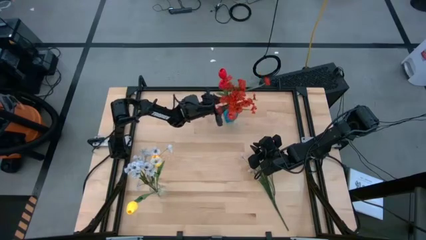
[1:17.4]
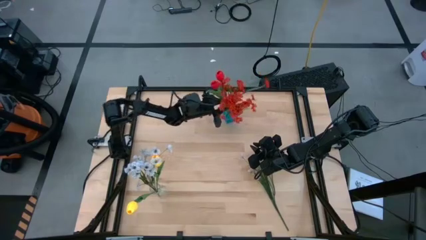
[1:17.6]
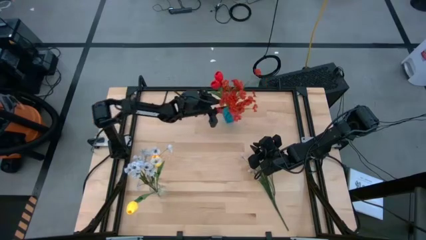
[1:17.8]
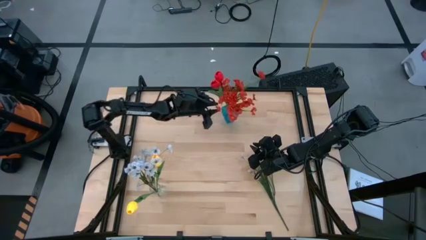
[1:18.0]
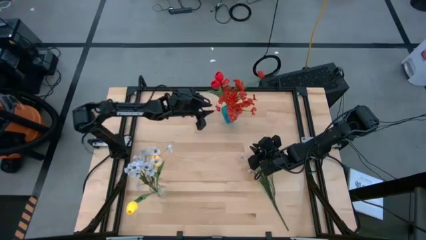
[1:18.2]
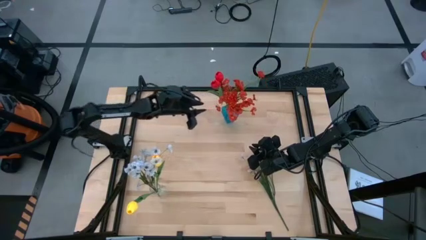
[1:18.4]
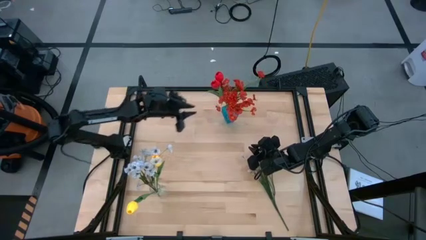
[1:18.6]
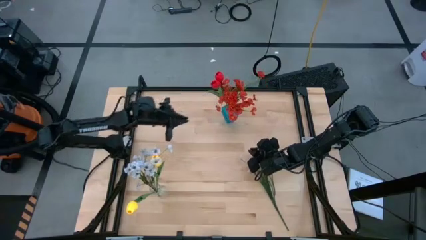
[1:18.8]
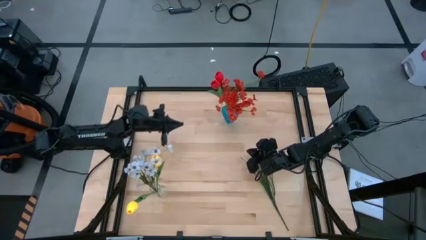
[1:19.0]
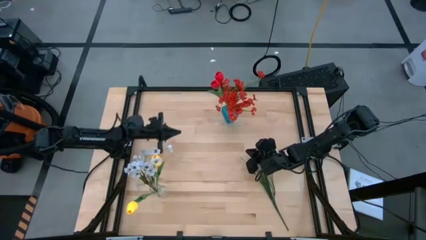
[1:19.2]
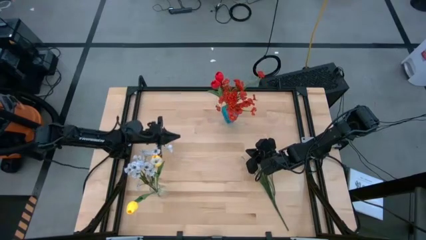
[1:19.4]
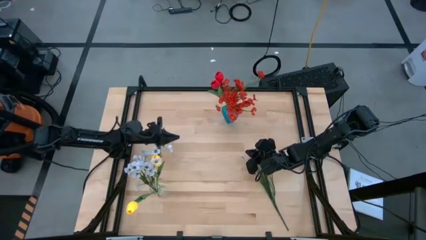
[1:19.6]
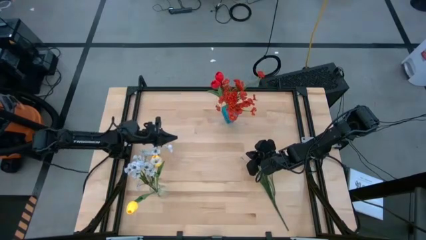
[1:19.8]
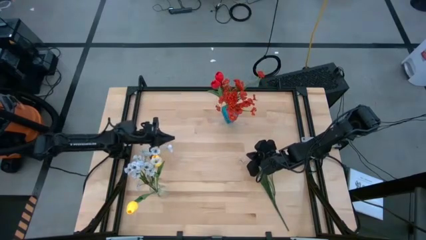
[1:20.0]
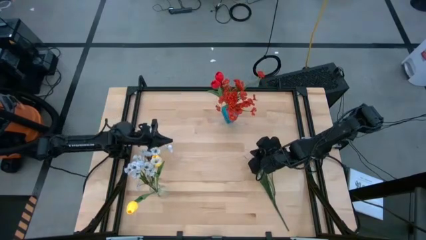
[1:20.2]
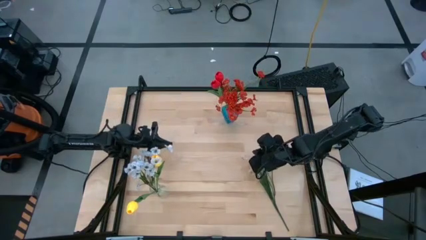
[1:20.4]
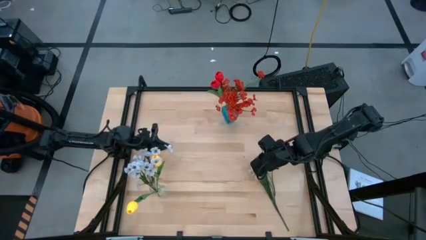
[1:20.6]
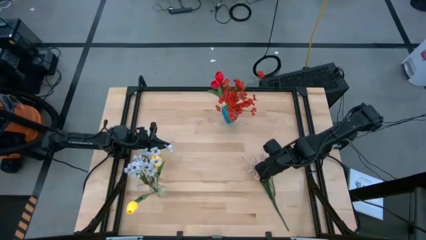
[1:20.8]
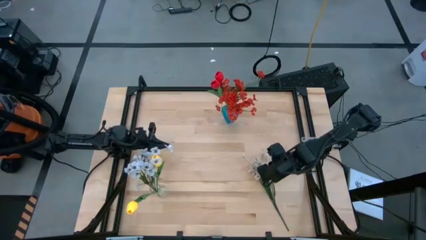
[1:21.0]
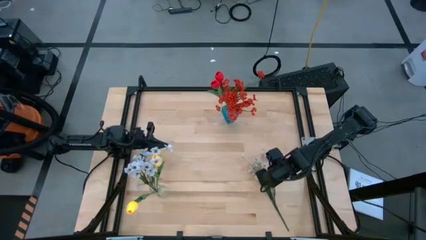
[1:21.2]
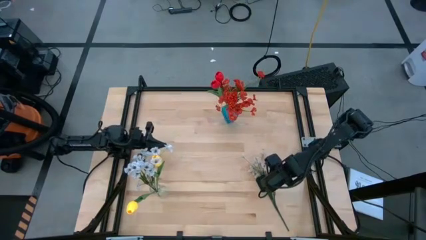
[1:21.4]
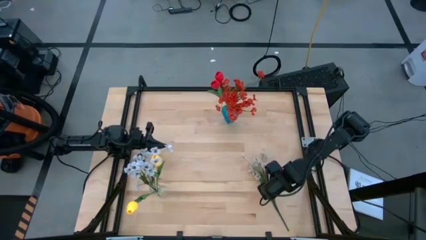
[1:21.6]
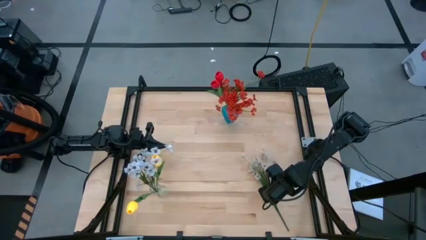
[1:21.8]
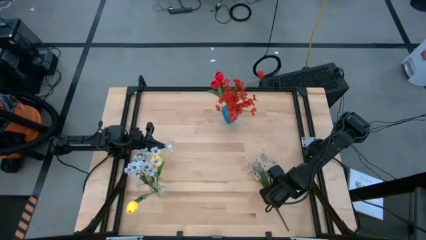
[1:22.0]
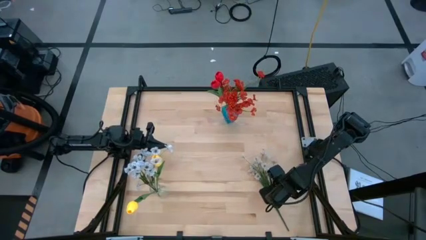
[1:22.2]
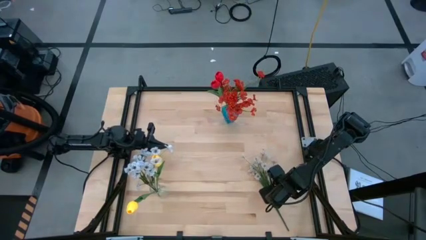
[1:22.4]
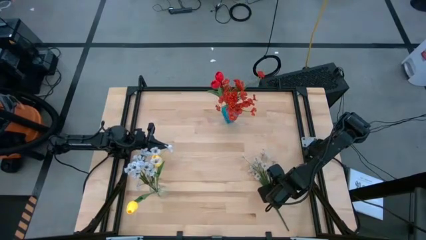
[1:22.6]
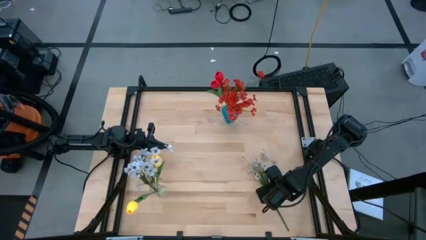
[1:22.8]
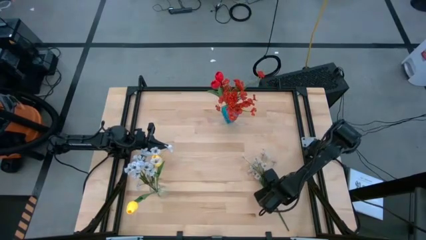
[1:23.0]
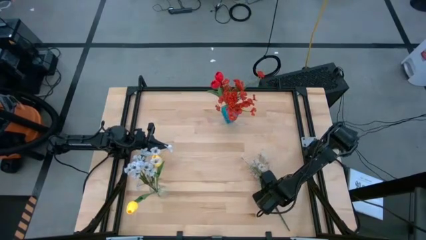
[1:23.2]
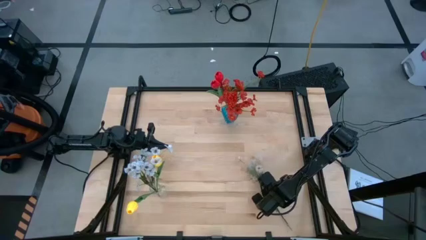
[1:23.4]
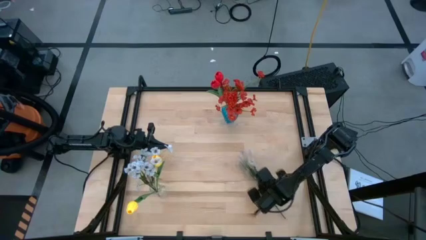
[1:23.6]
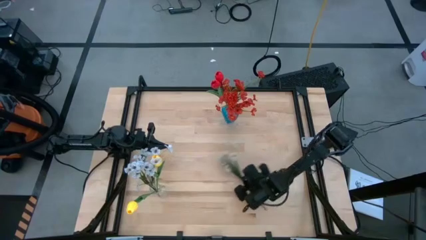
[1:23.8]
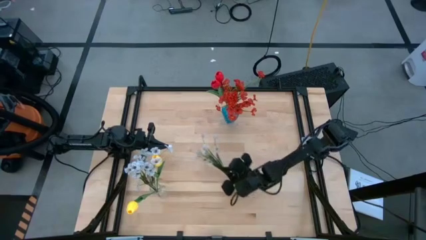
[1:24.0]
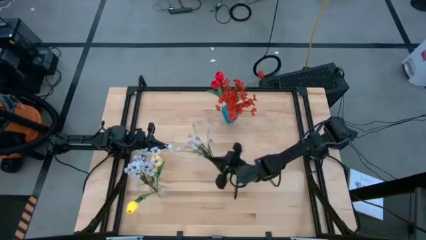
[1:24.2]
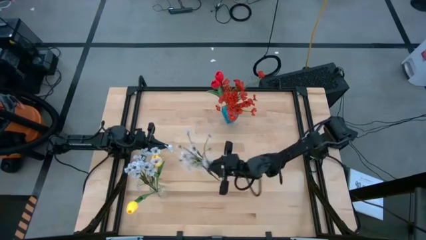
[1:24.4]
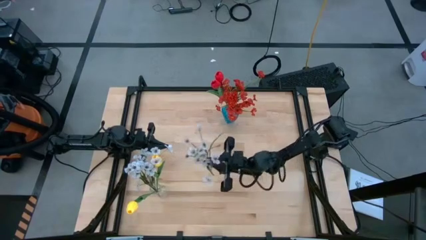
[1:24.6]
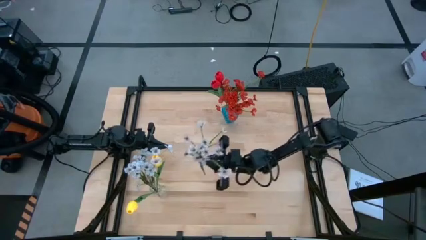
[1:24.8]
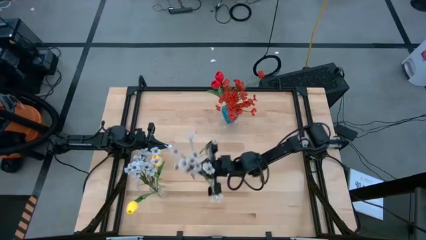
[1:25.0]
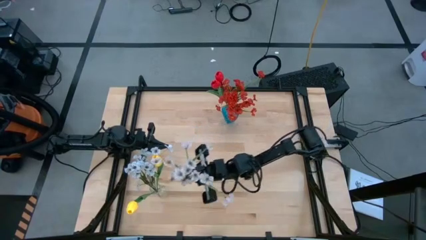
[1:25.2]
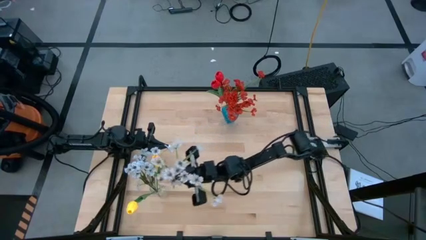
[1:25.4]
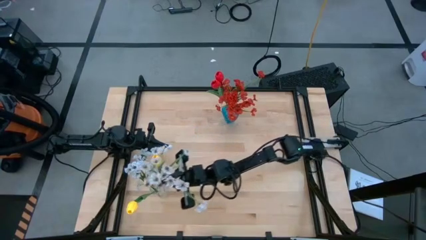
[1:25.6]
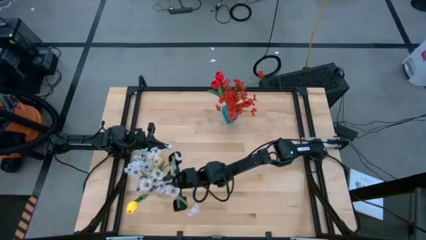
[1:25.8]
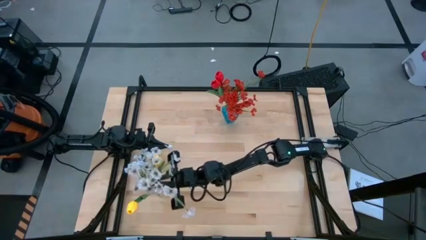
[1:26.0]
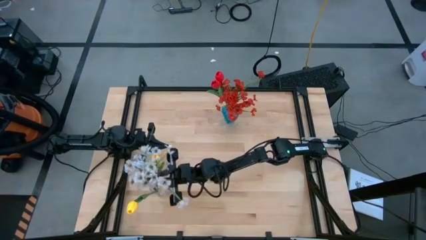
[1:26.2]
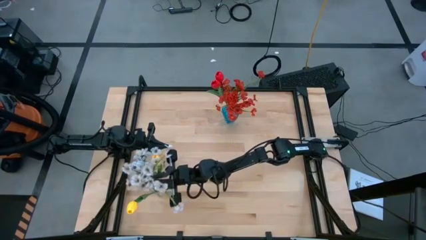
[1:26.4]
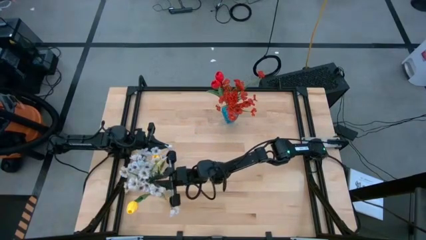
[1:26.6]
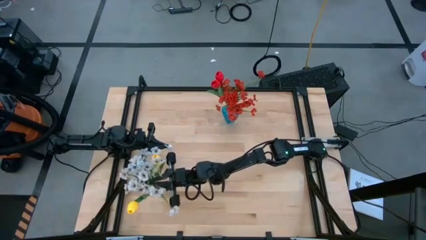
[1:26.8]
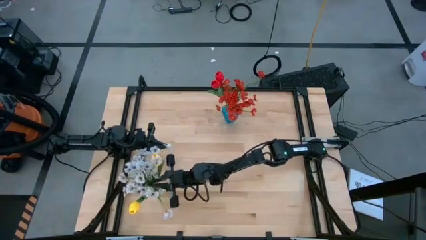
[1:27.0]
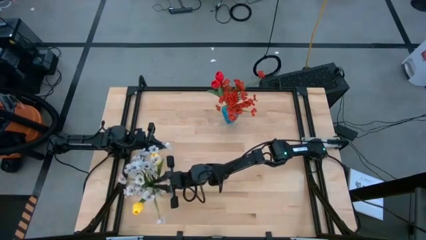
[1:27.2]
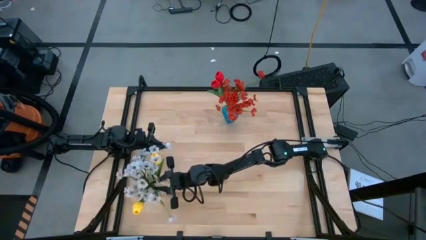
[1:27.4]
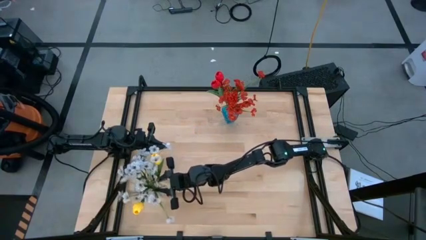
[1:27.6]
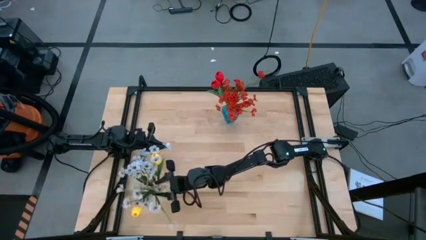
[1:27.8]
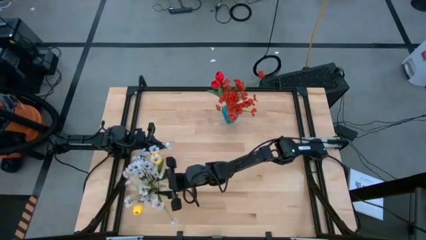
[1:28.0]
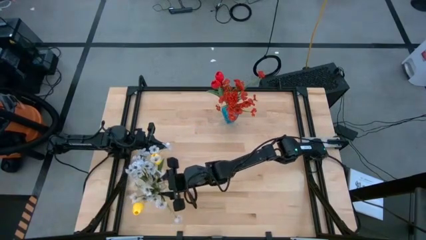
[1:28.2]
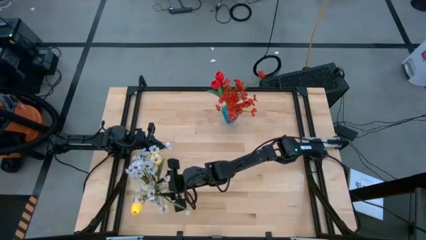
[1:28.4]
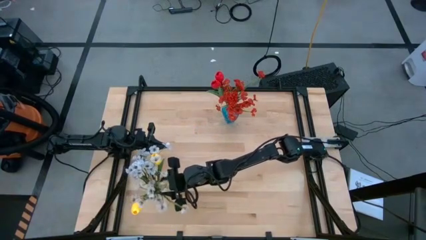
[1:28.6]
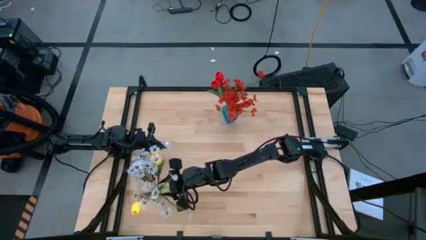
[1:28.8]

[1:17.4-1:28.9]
Task: Sort flowers into vase by color
Put the white flowers into the transparent vase

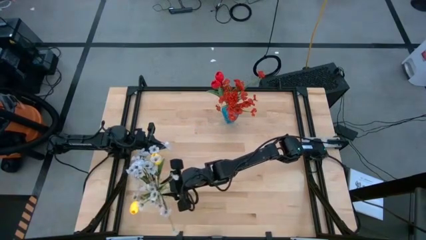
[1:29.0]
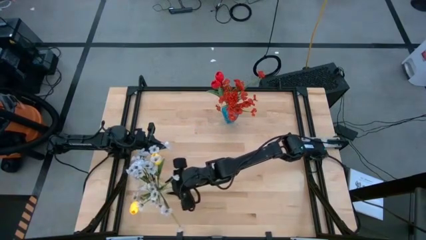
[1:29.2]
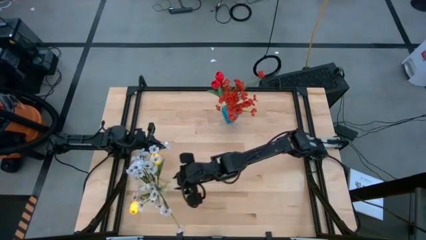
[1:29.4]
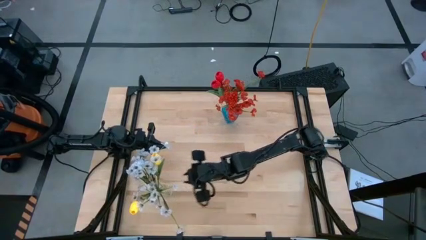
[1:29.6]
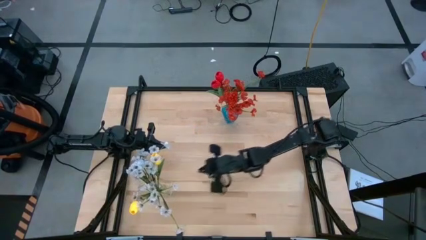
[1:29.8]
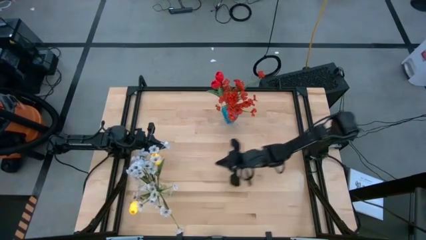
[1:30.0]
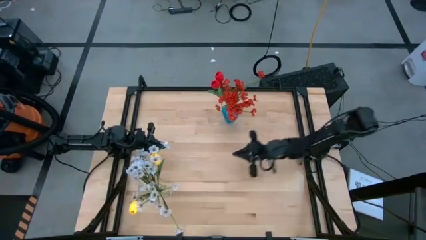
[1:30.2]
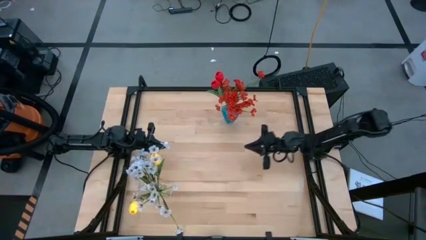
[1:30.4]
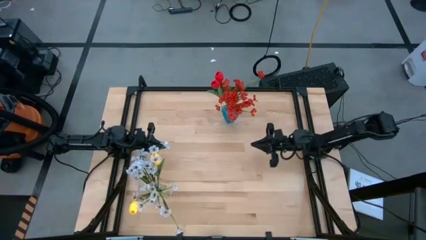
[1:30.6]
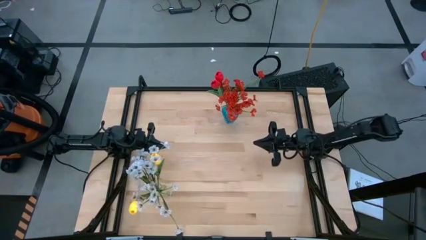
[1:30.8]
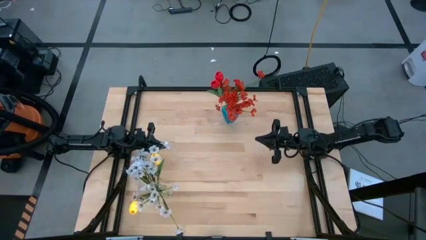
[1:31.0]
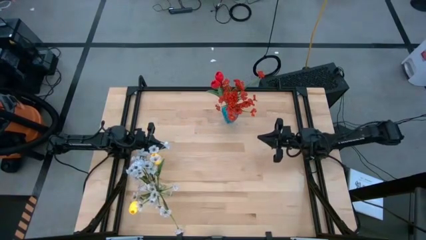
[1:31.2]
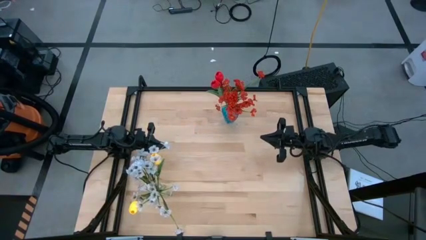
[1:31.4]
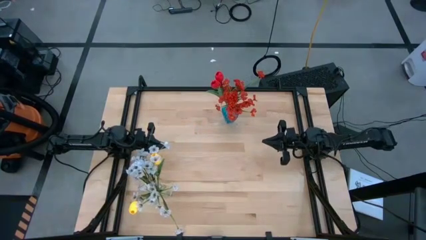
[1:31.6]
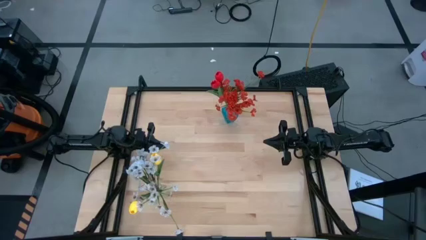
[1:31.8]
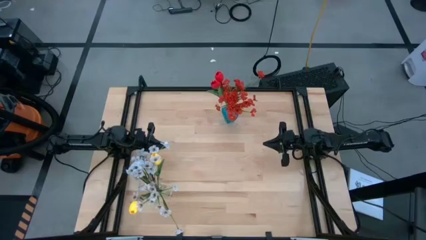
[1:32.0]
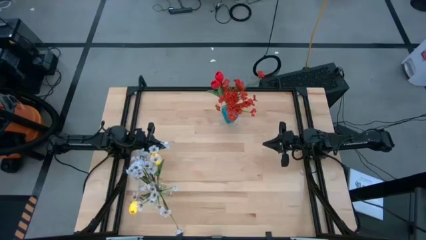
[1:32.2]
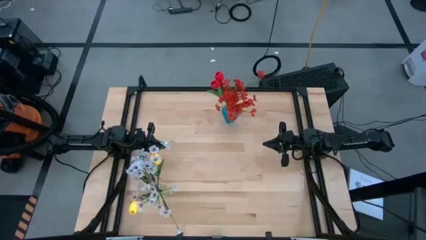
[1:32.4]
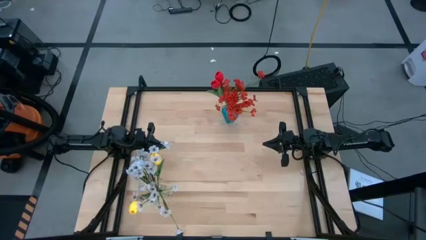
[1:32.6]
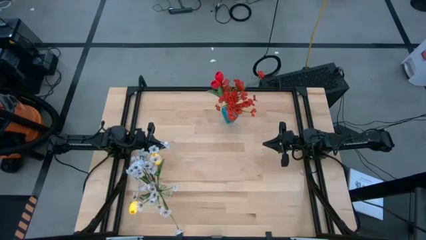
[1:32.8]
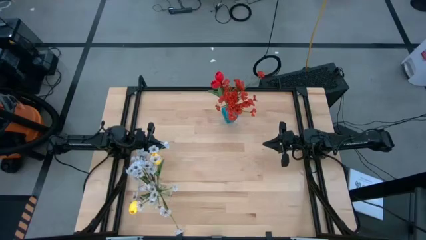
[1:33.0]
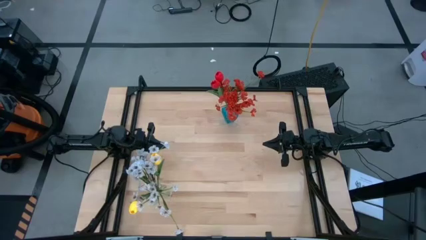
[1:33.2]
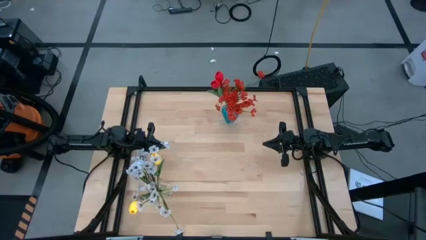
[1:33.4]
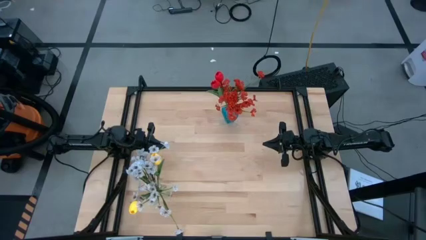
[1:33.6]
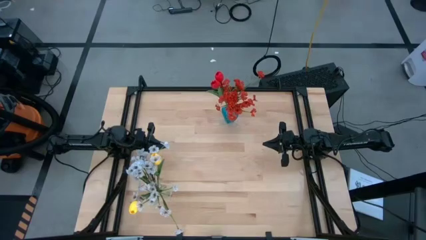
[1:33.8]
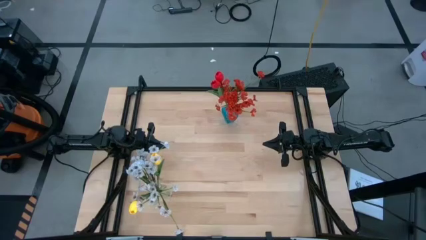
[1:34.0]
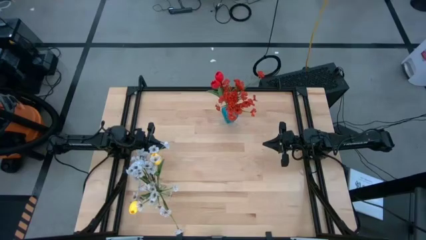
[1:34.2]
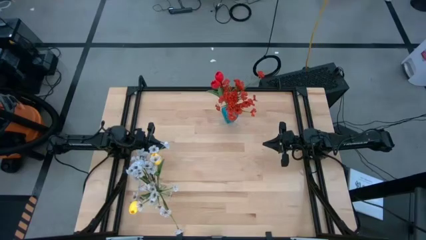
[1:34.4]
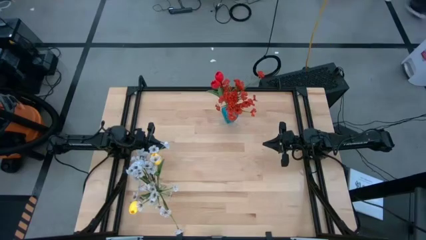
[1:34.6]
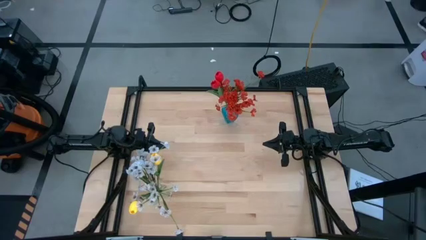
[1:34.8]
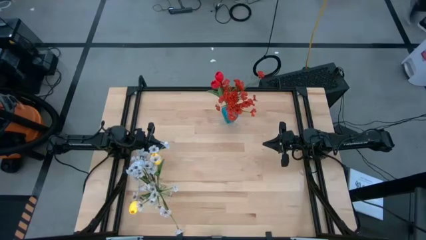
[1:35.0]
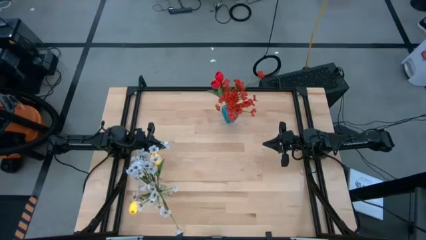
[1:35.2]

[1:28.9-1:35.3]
Return to Home Position
